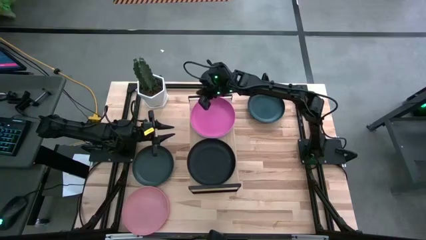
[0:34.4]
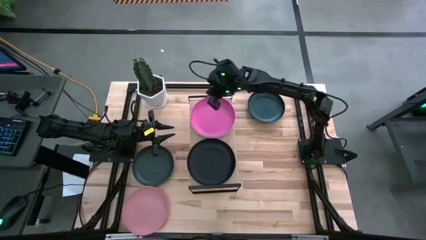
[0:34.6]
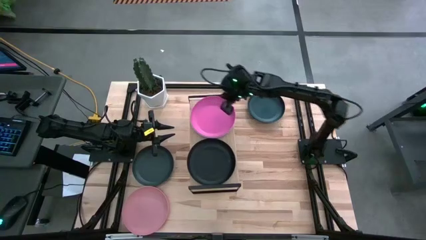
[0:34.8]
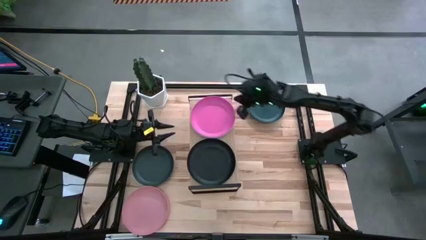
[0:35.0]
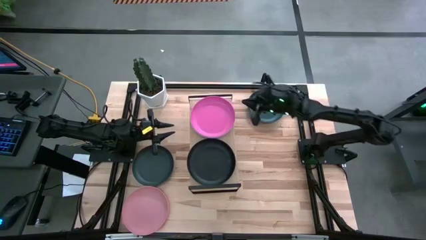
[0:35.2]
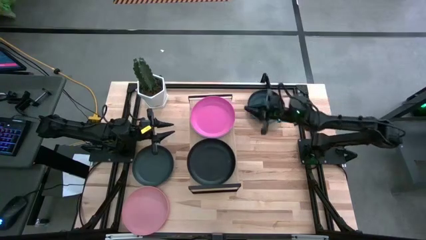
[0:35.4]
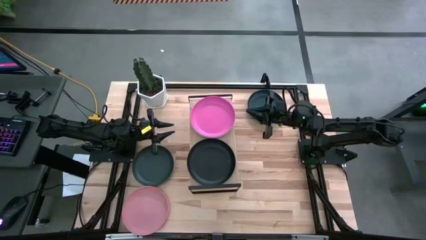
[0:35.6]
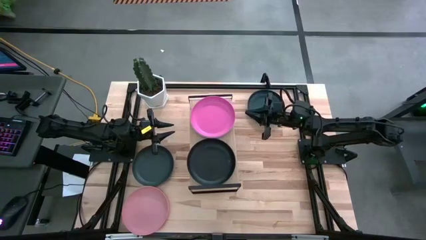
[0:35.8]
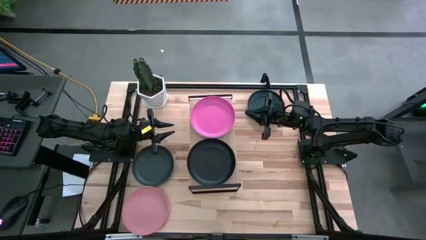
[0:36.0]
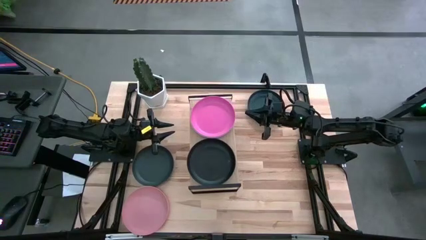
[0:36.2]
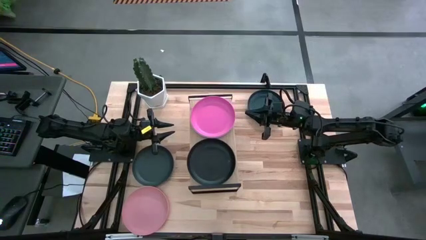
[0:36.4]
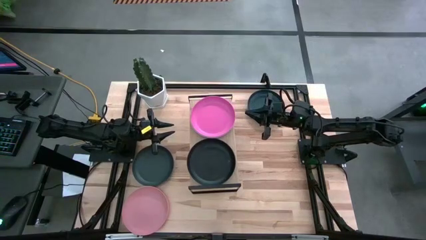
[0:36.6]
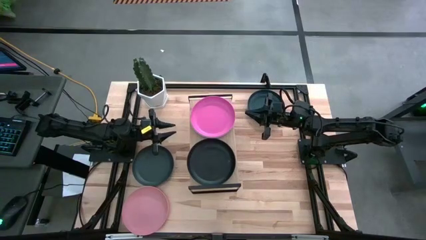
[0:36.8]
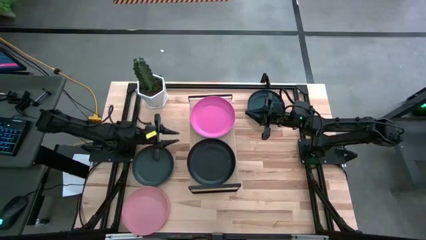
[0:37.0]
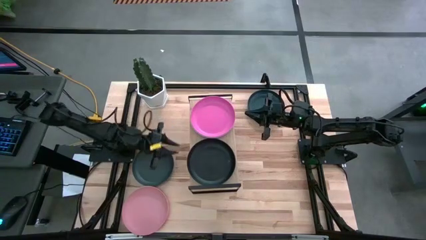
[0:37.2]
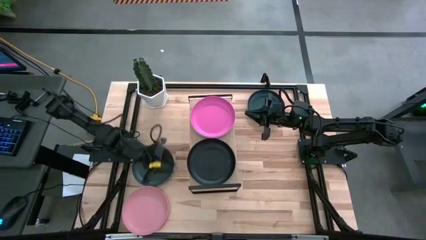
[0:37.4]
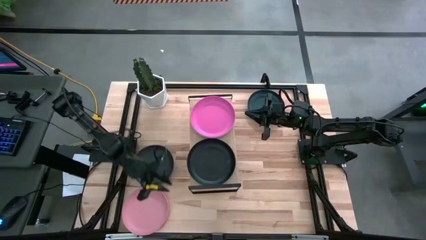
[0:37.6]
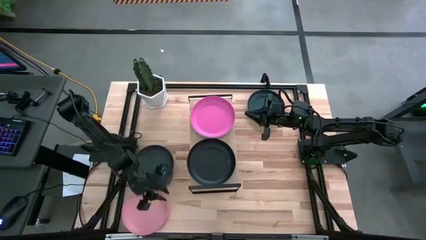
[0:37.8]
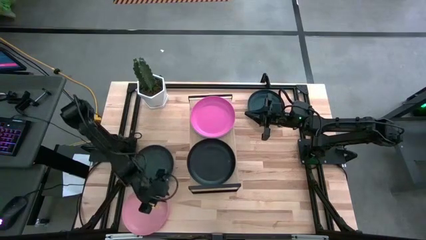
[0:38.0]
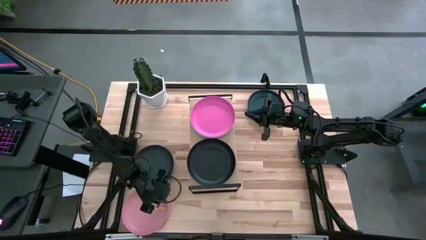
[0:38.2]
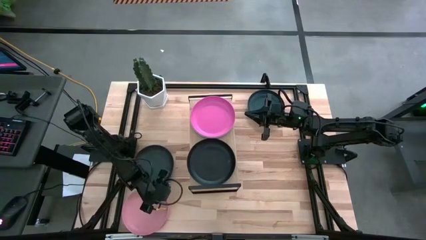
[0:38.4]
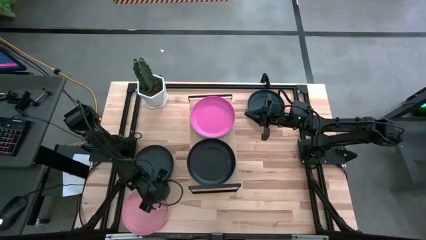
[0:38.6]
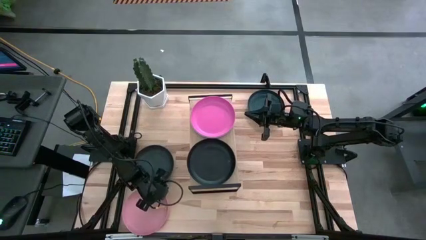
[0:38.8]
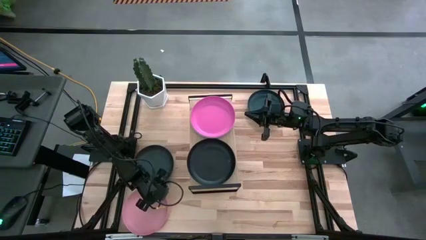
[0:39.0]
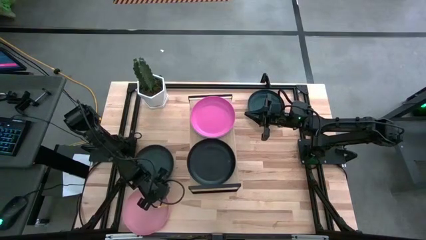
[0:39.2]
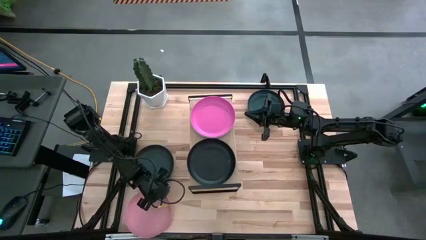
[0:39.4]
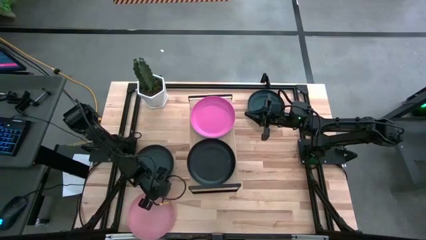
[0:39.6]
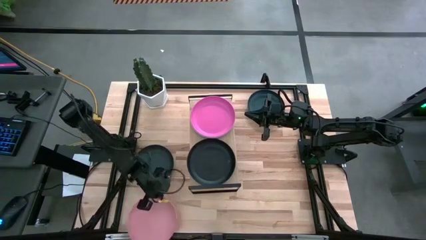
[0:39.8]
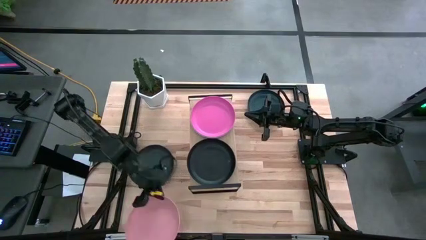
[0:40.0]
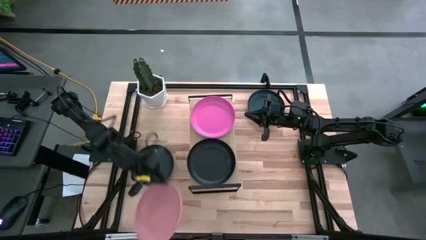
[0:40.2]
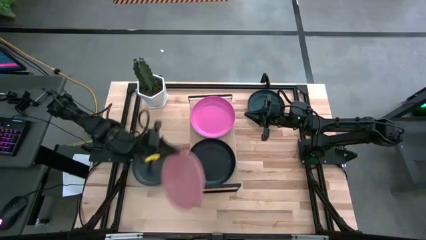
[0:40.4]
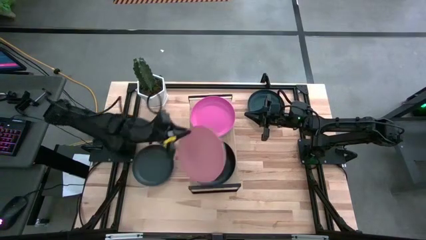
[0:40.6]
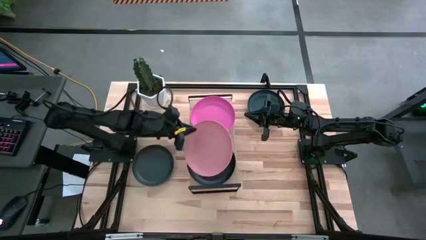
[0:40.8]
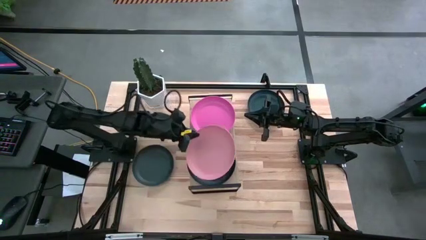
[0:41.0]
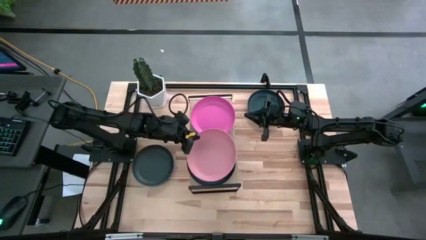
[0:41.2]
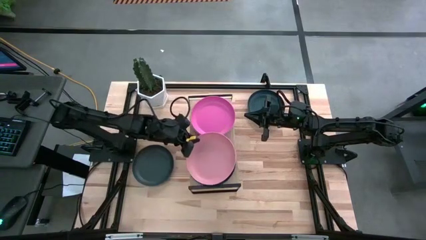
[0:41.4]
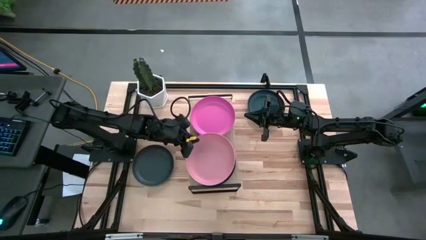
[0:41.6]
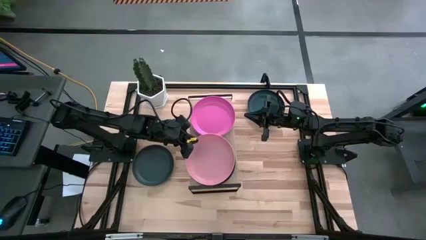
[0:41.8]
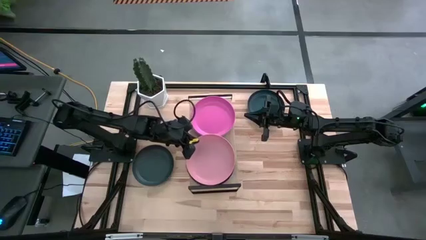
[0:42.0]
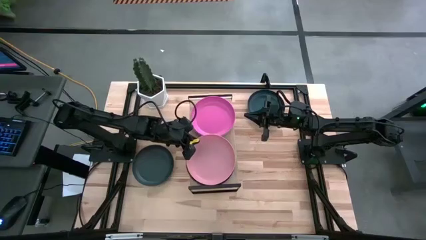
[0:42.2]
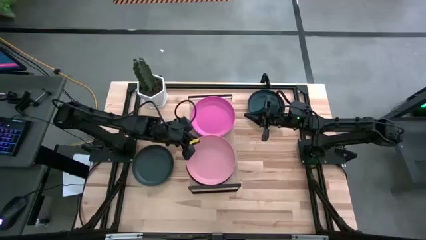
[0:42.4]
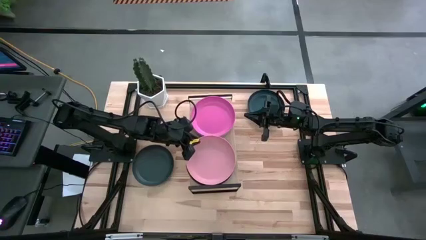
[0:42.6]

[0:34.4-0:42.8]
Task: Place and stack plates onto a shelf
Stack the light pink plate on top of the black plate on the shelf
